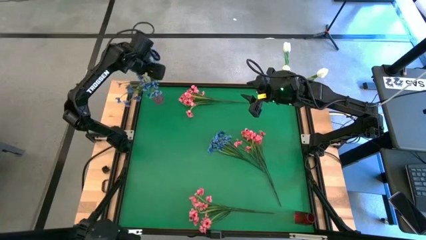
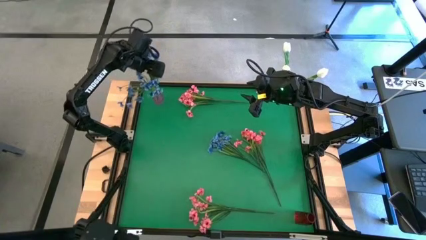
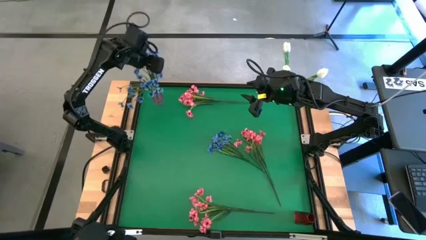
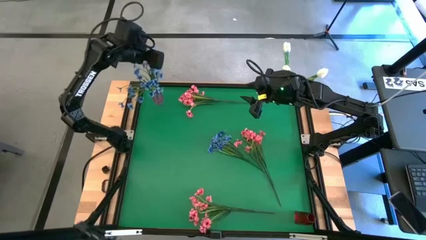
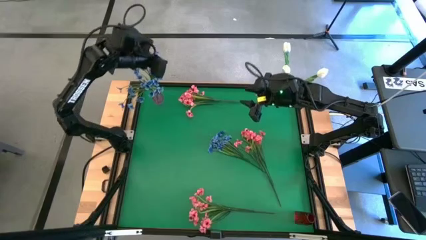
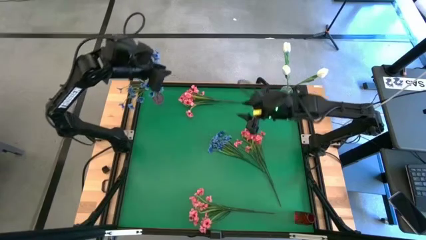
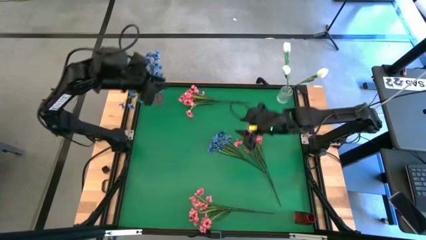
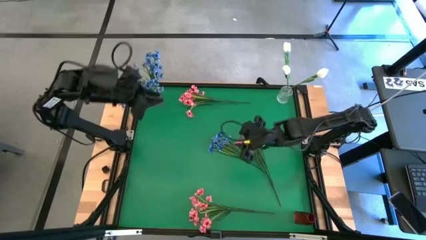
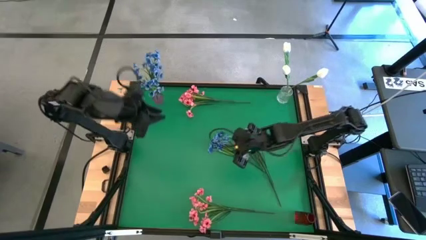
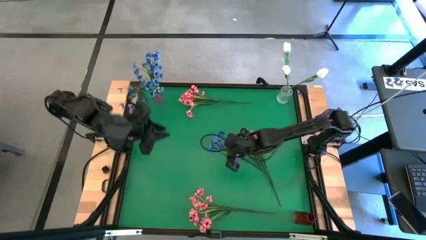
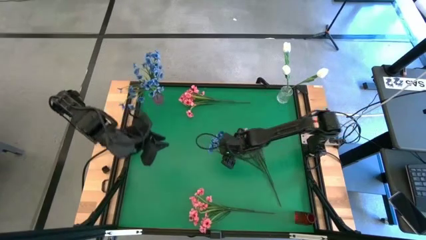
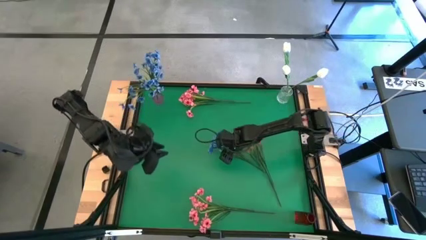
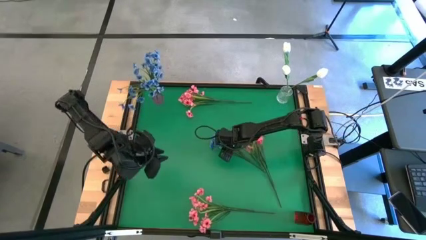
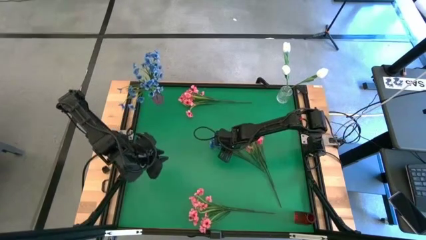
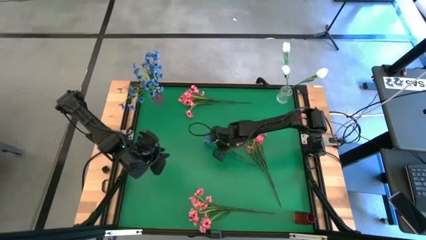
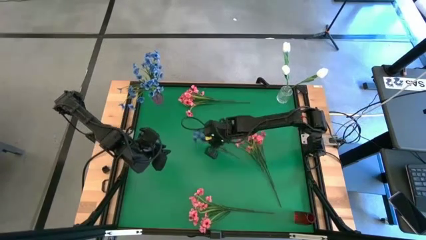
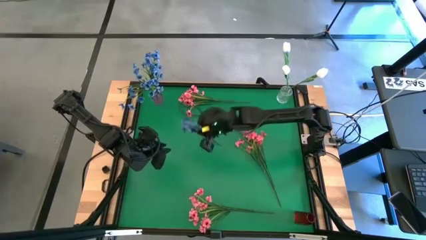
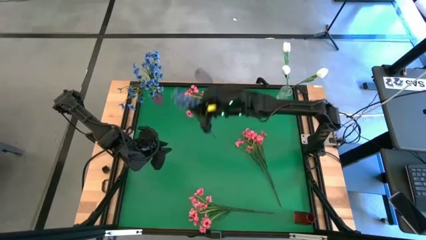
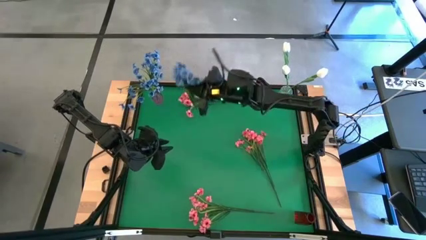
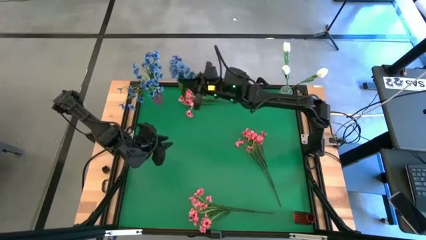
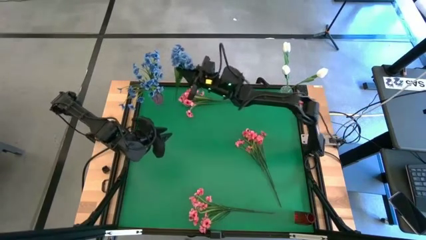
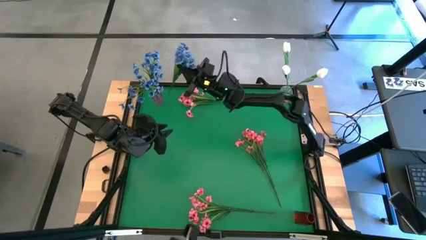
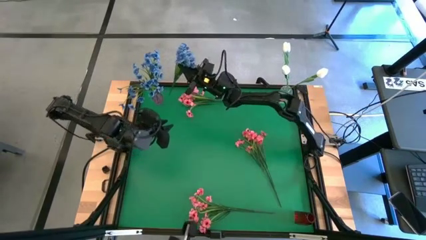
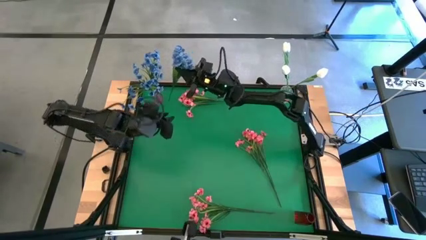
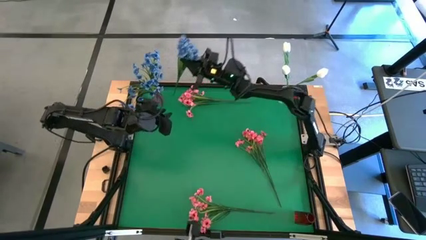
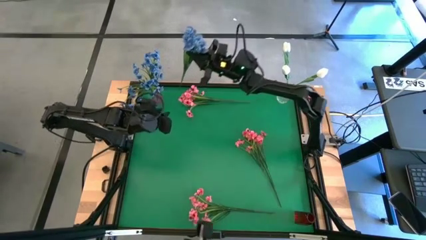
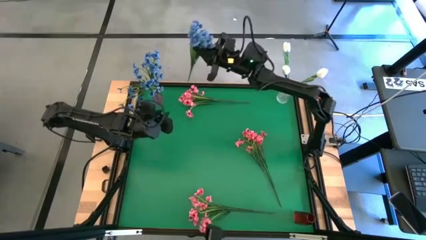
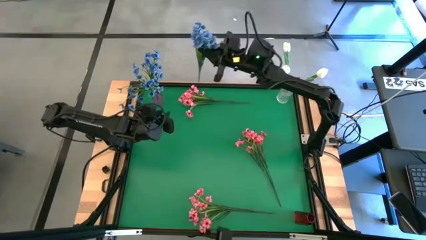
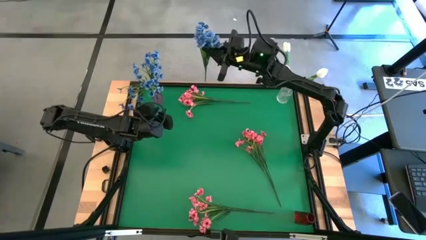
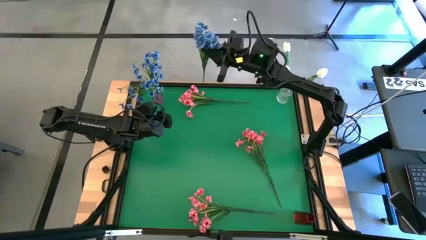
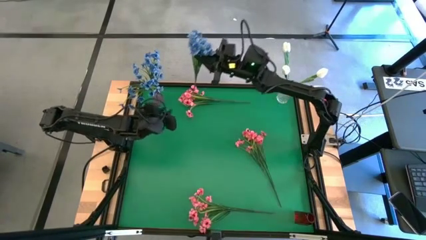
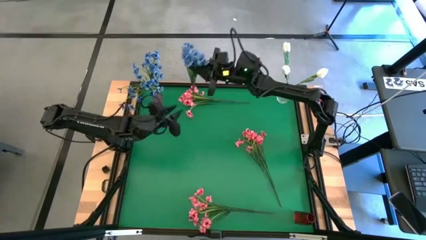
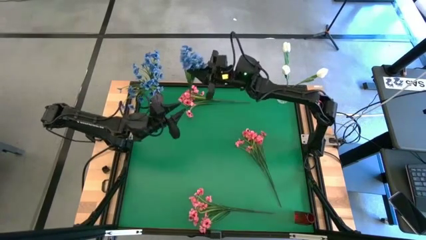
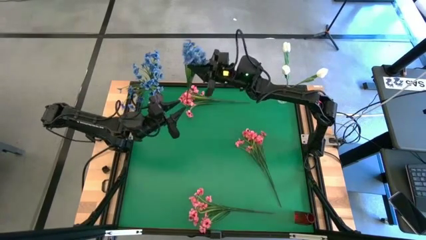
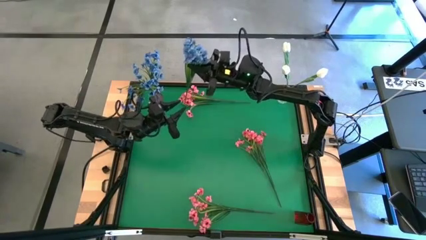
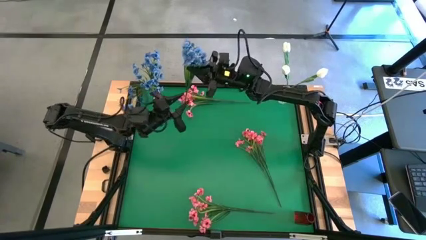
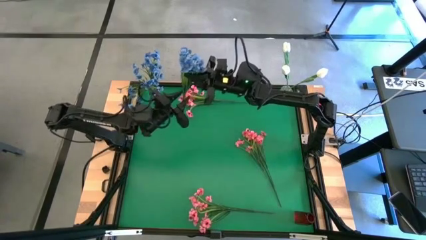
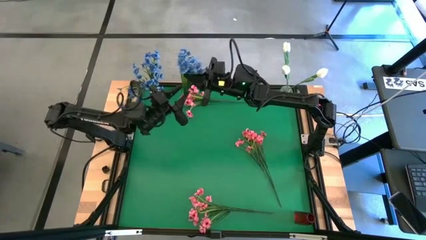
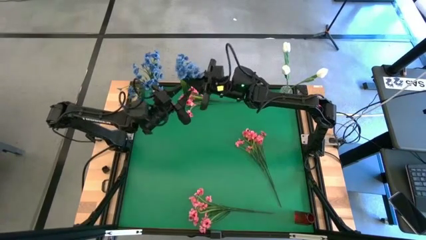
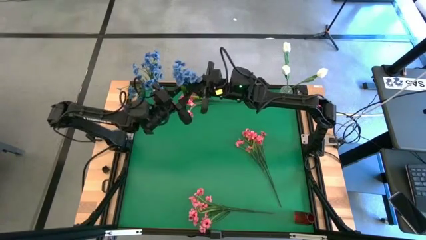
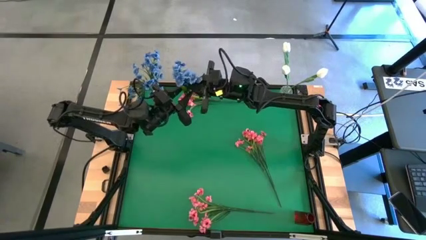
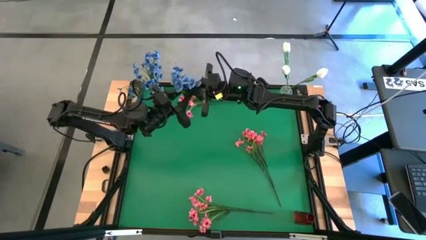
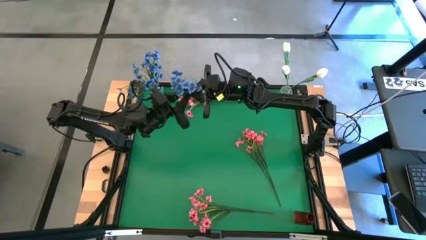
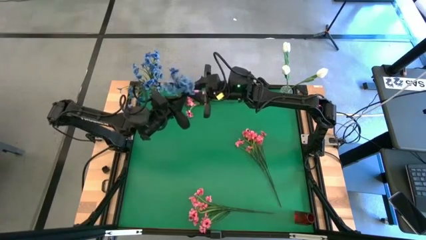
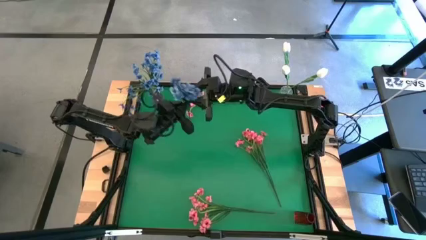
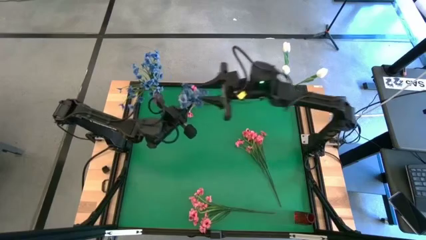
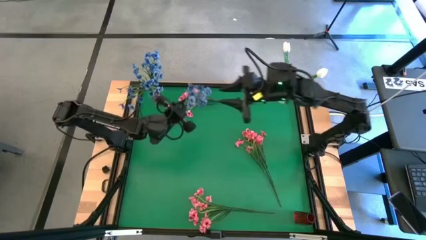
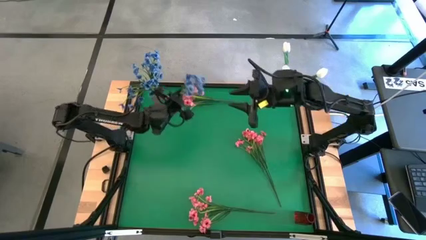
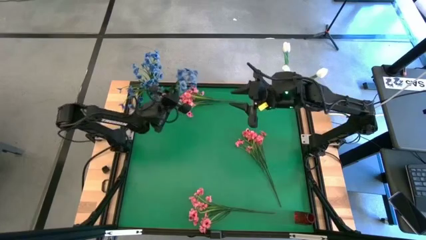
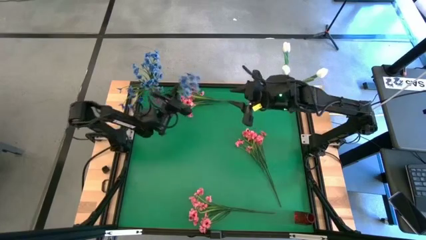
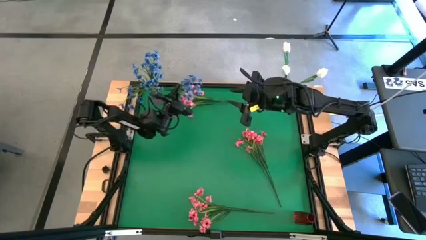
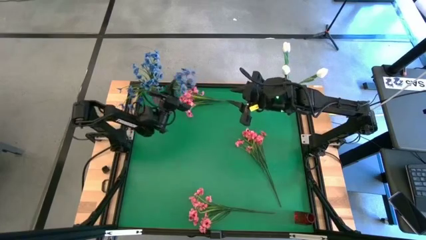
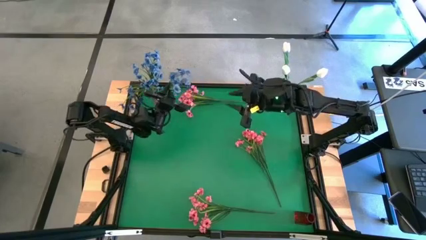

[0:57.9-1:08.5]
Task: Sort flowers into vase by color
Put the blue flowers into the violet vase

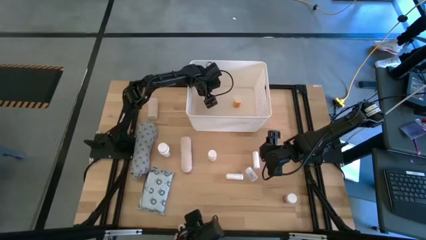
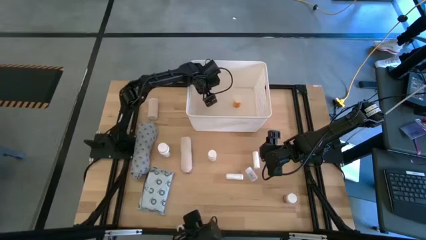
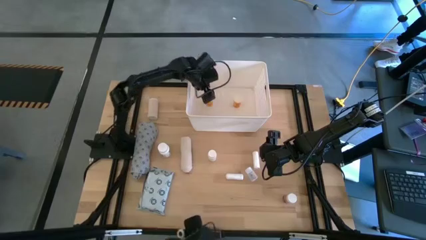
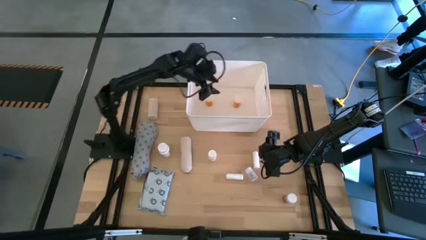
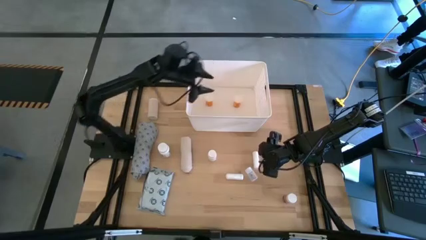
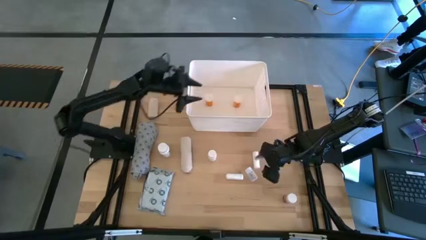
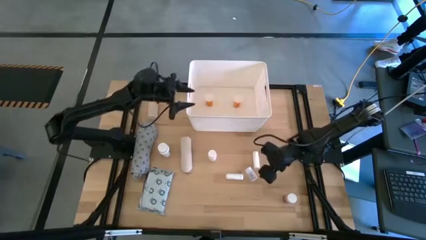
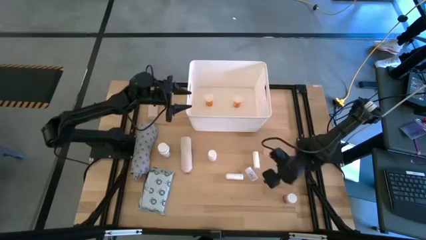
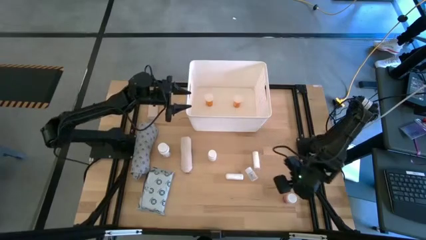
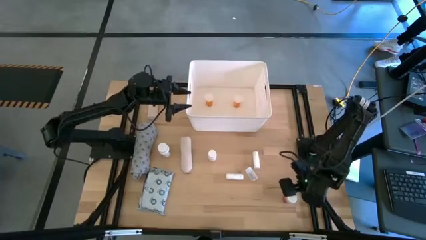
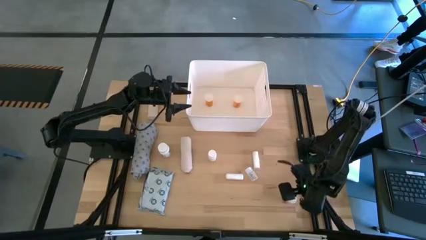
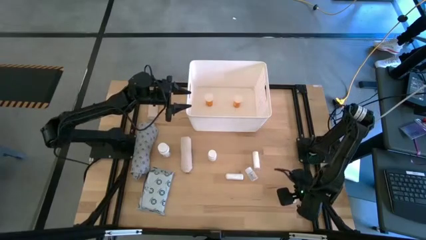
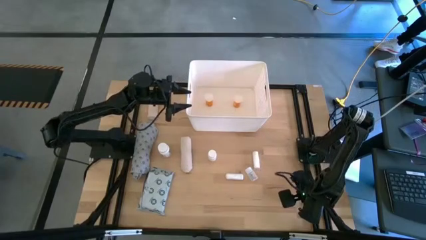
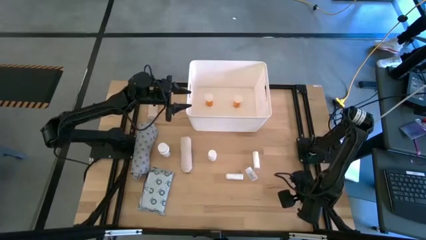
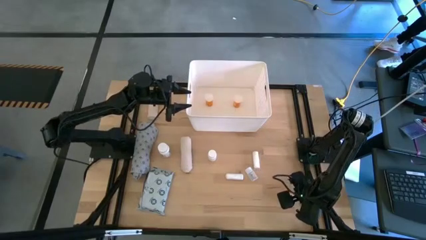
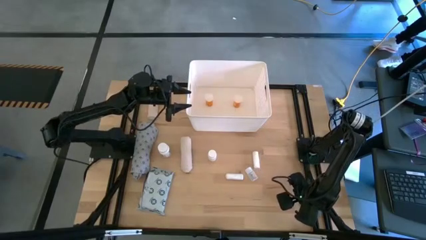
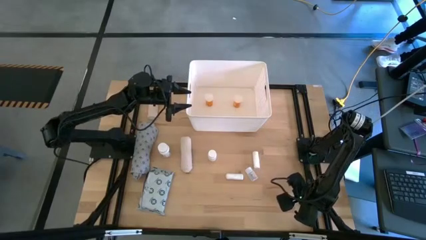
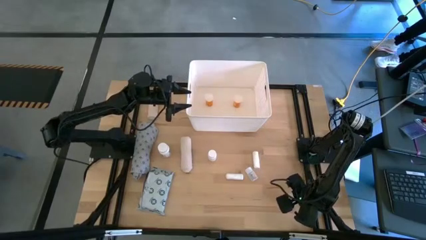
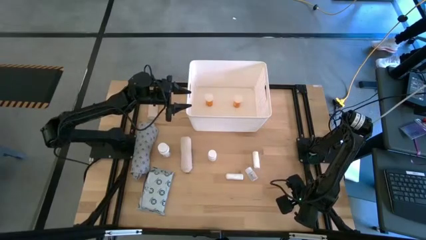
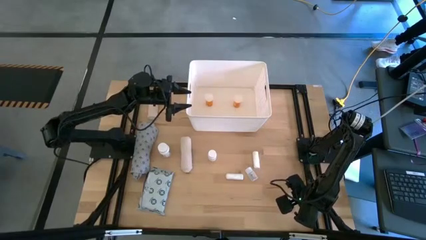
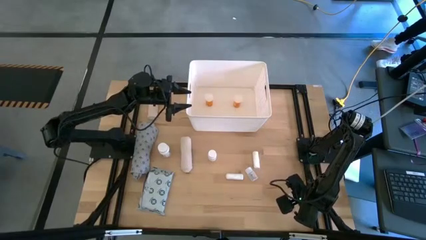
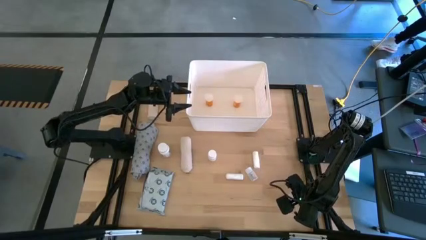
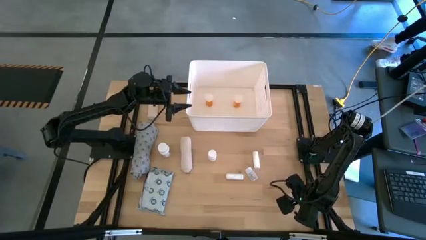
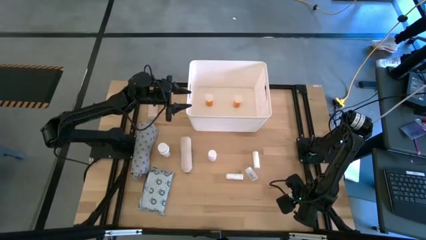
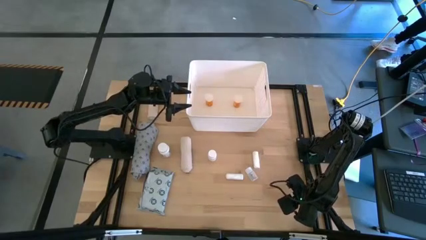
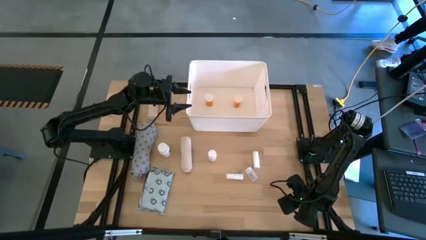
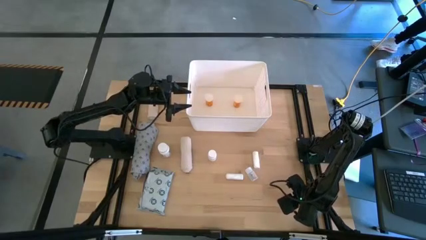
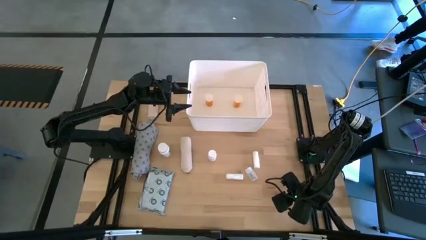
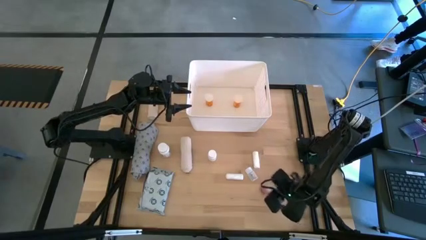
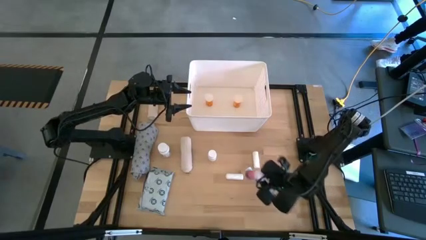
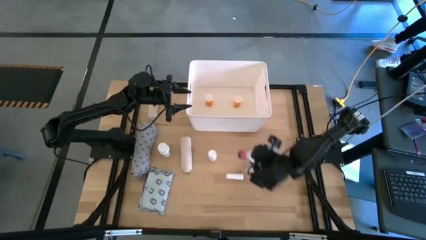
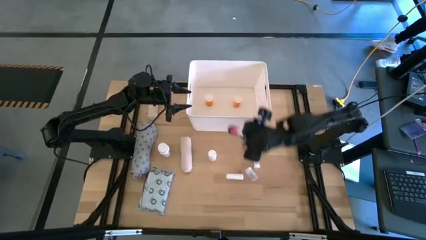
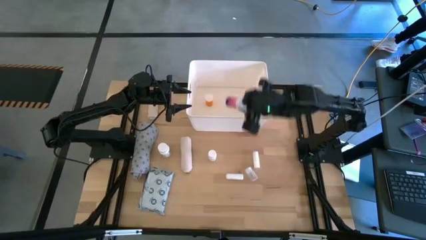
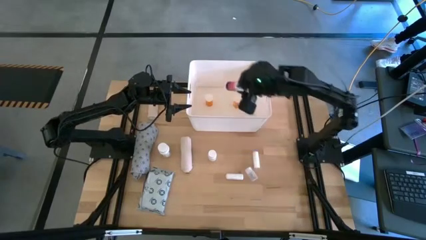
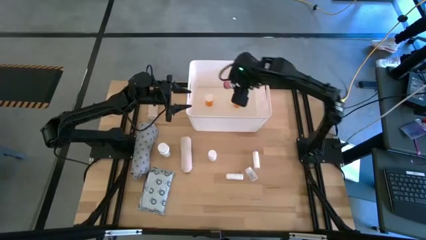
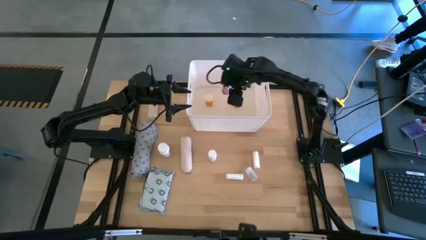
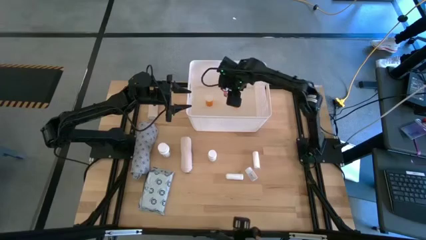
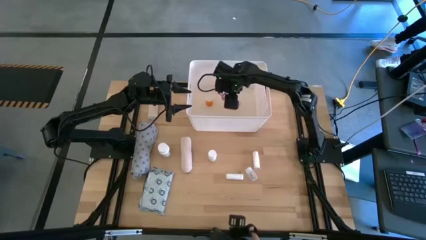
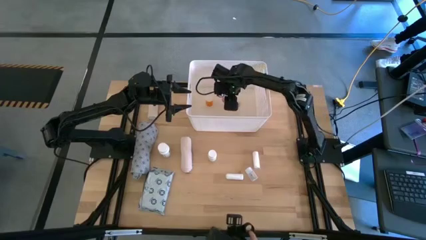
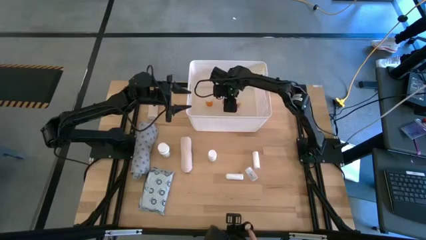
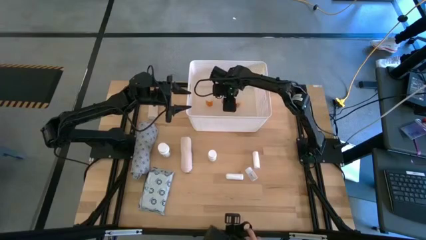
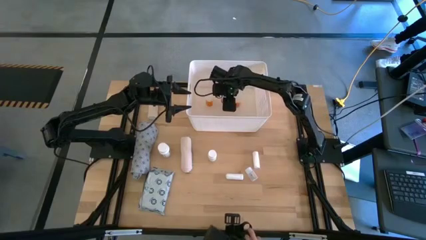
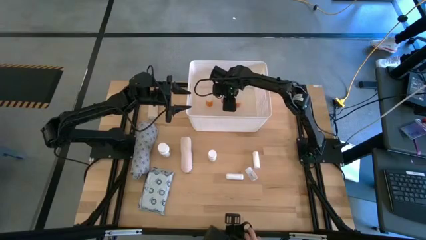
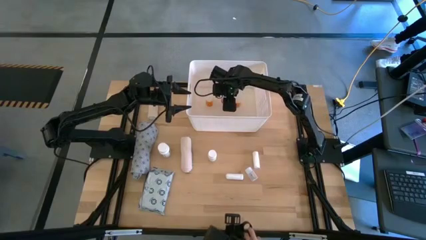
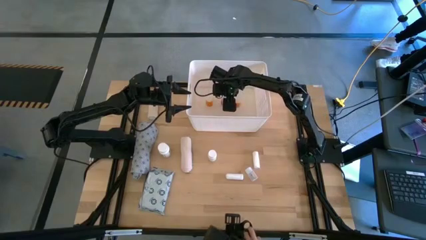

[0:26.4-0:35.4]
Task: Pick & place medical supplies in basket/bin
Put the pink pill bottle into the white bin
